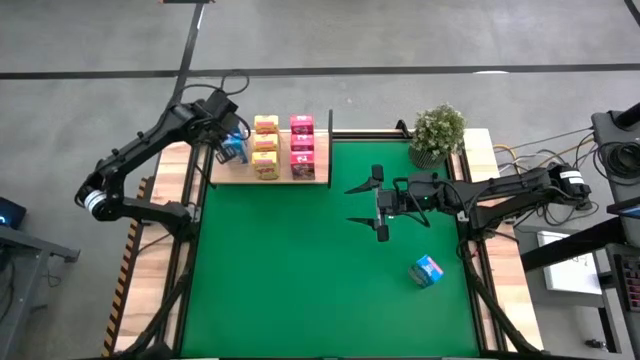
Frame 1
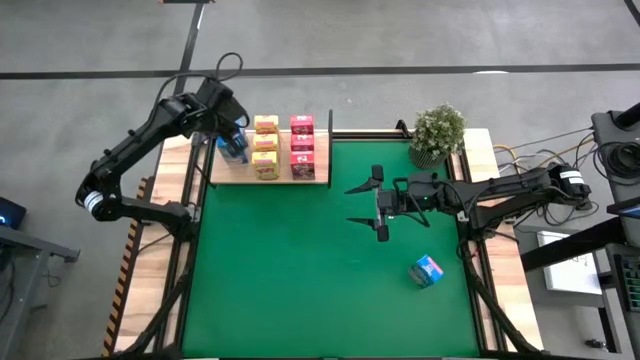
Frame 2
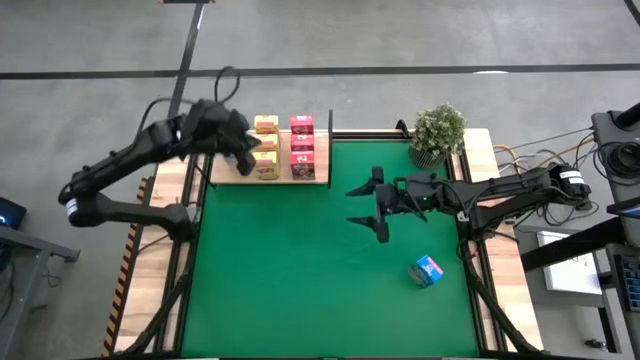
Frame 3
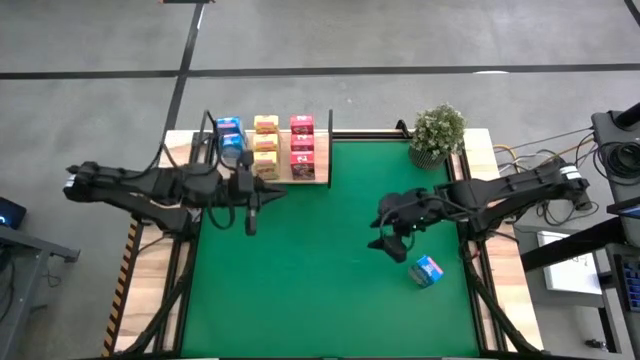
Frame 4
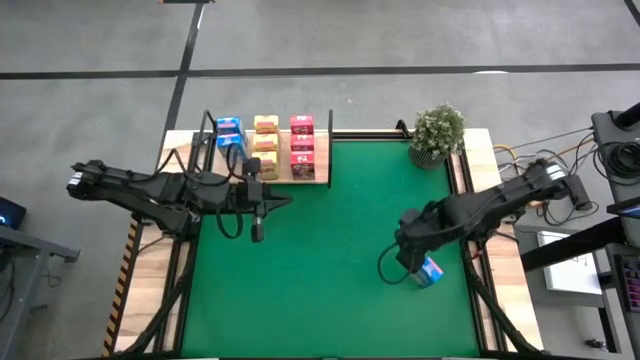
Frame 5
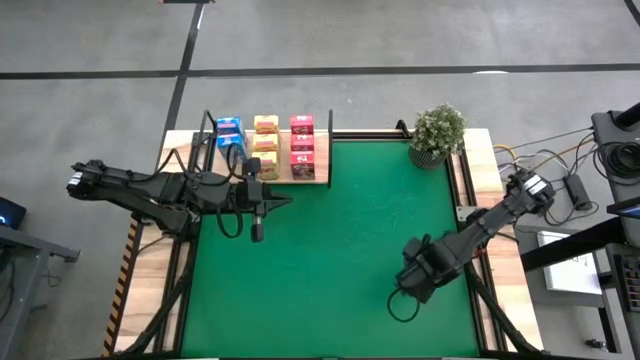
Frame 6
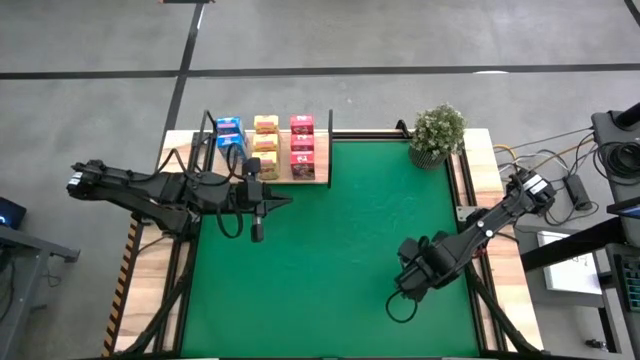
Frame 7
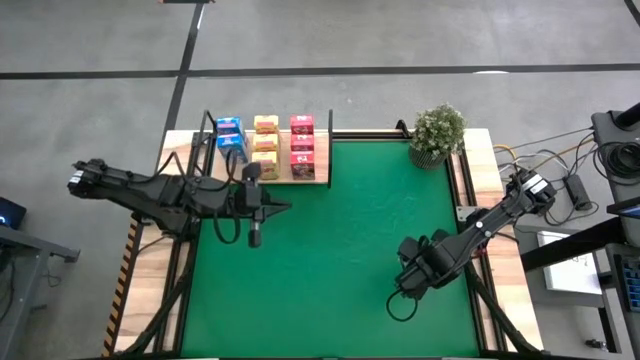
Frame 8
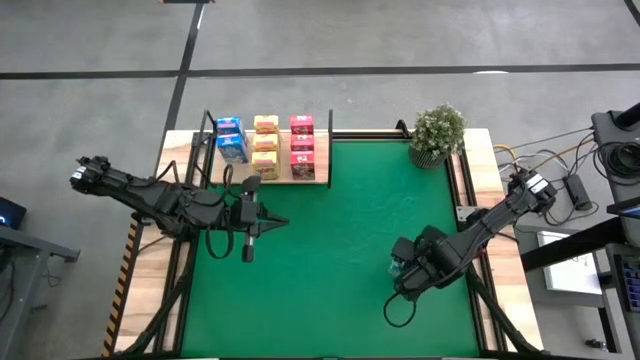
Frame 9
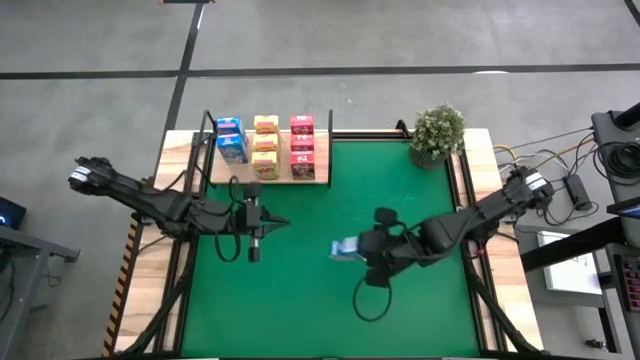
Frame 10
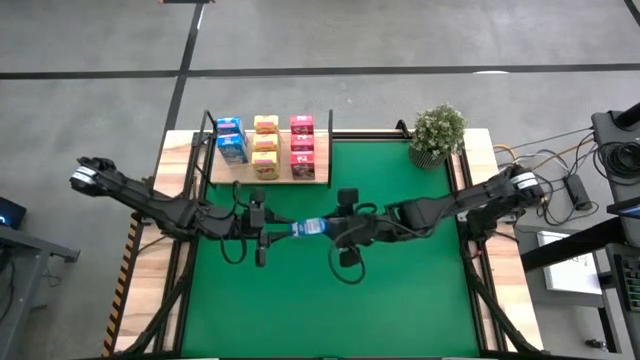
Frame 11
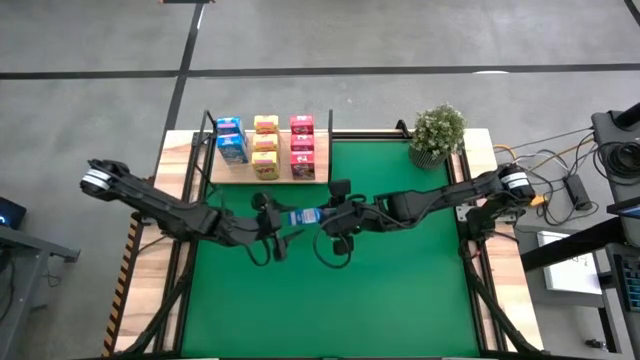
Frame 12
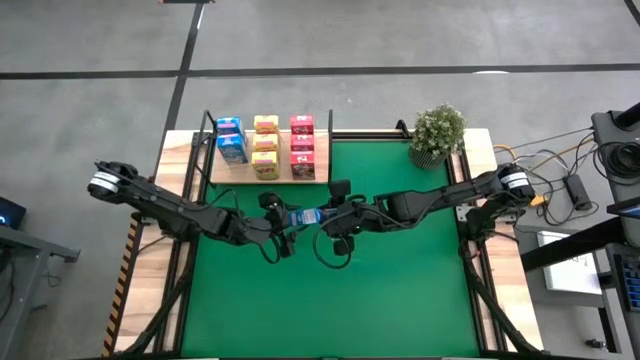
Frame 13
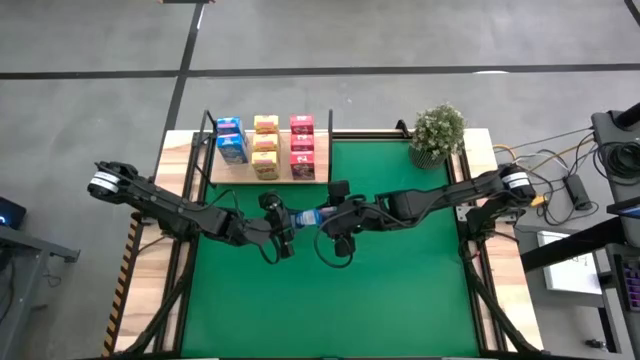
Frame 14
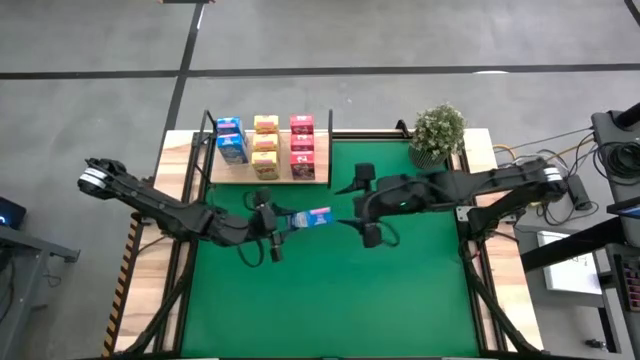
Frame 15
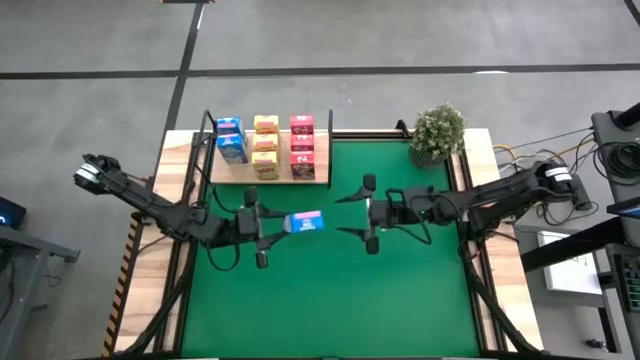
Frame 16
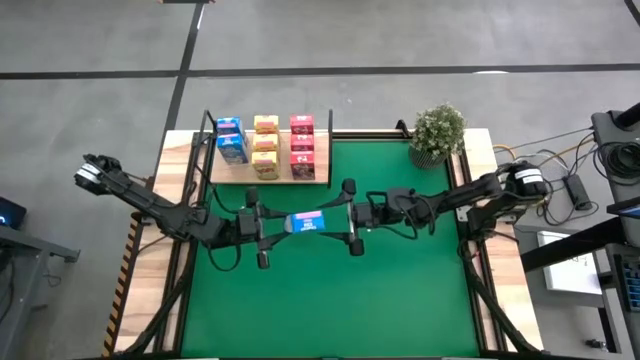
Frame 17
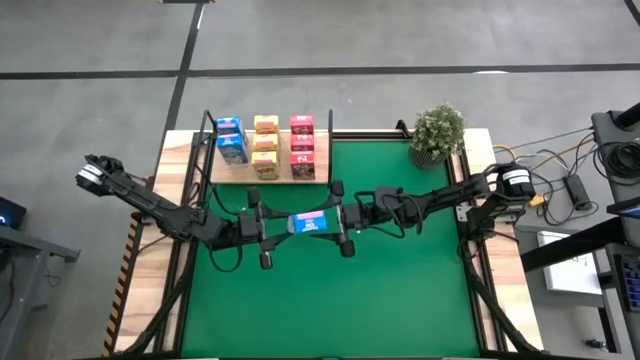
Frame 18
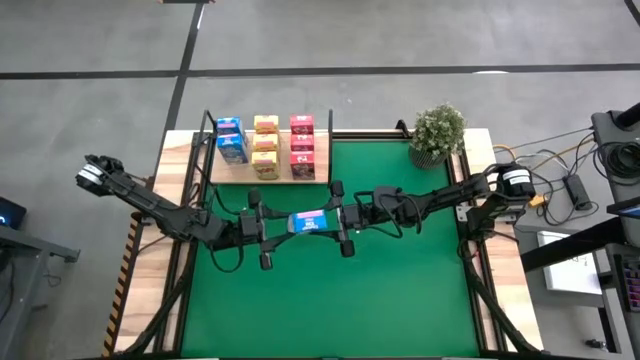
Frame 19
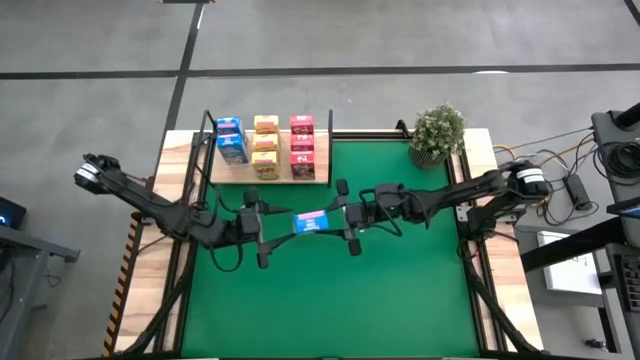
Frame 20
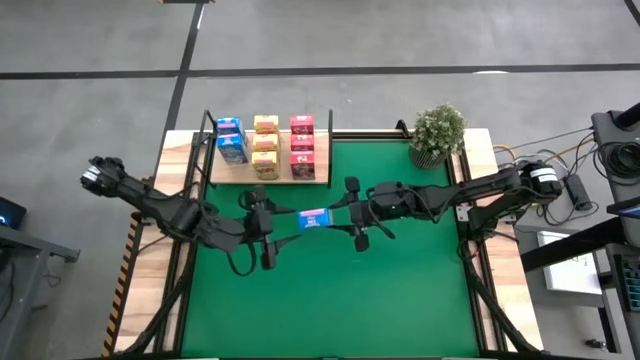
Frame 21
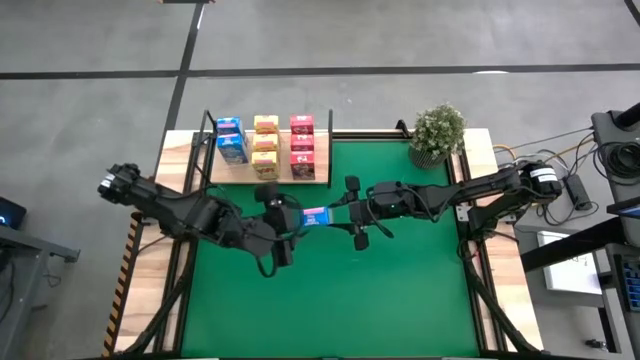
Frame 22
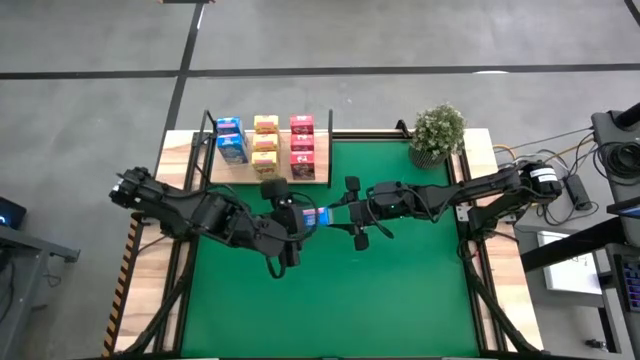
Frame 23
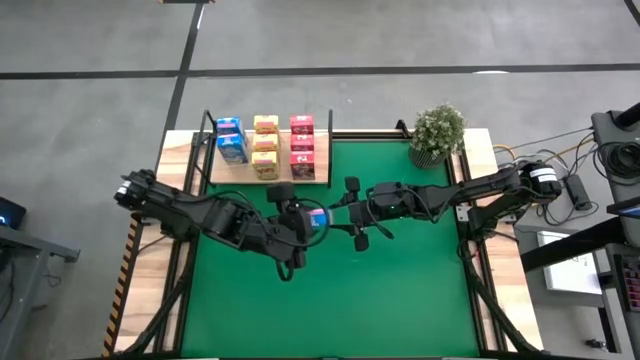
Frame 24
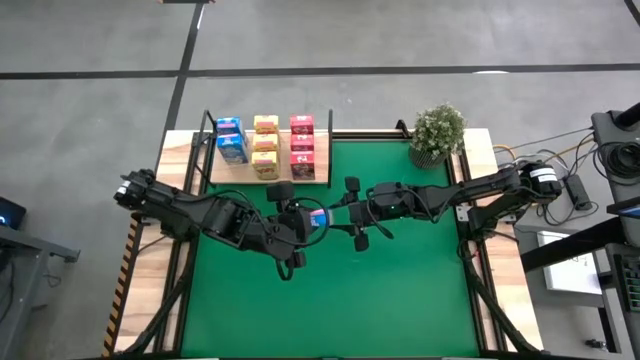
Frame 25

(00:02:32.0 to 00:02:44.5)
Task: Stack cereal on shelf
Put the blue cereal box aligned with the blue cereal box on the shelf

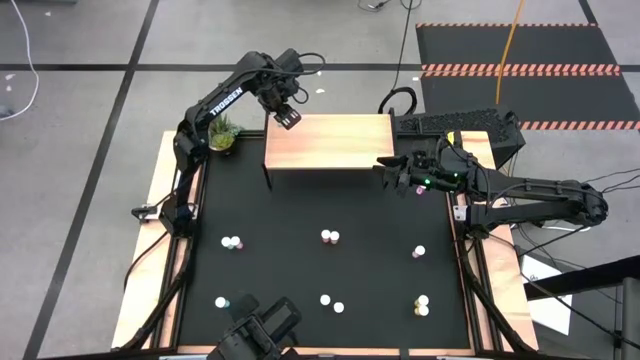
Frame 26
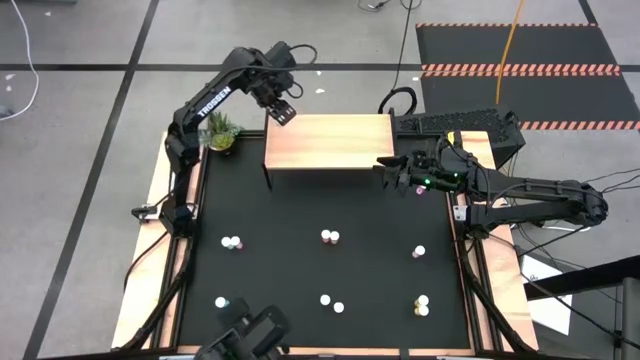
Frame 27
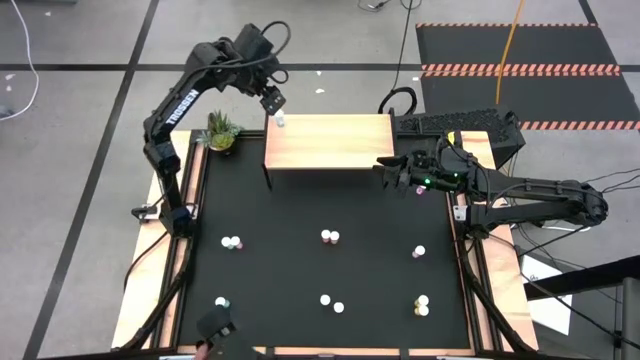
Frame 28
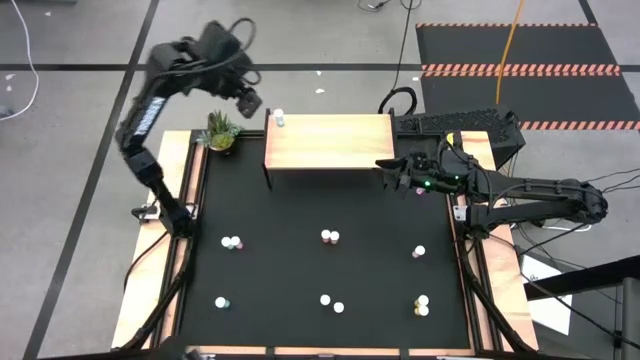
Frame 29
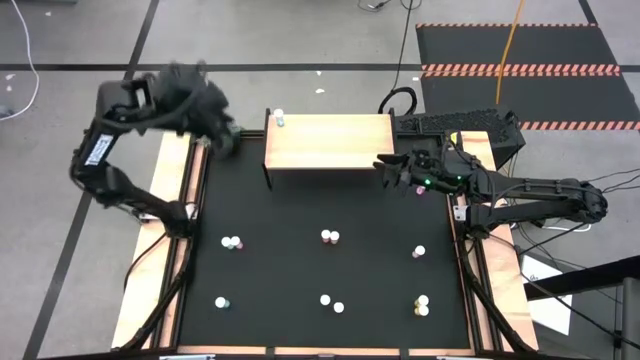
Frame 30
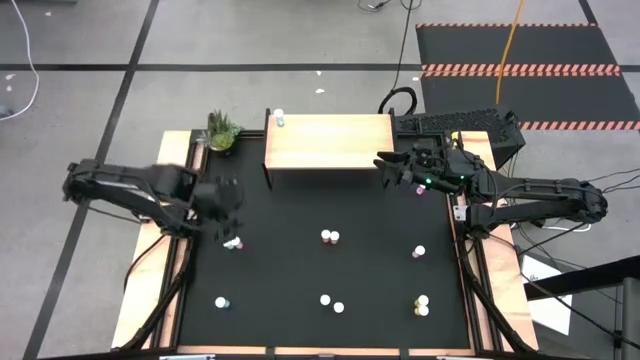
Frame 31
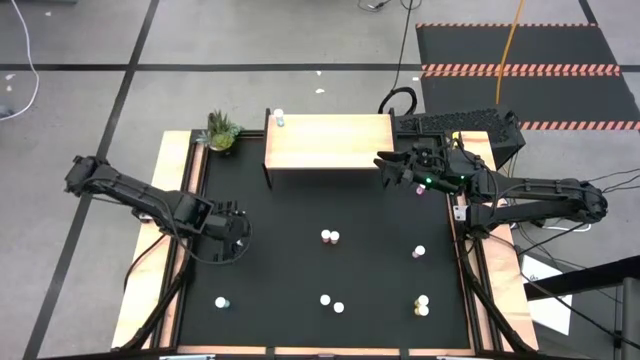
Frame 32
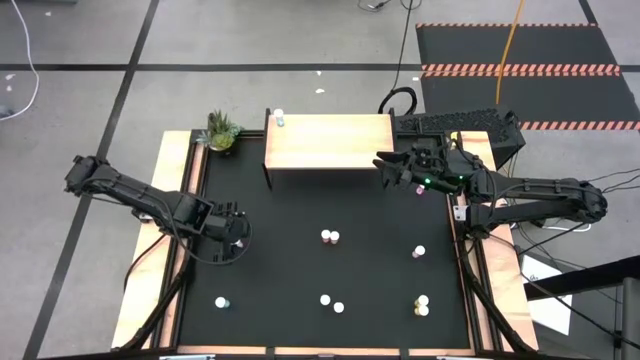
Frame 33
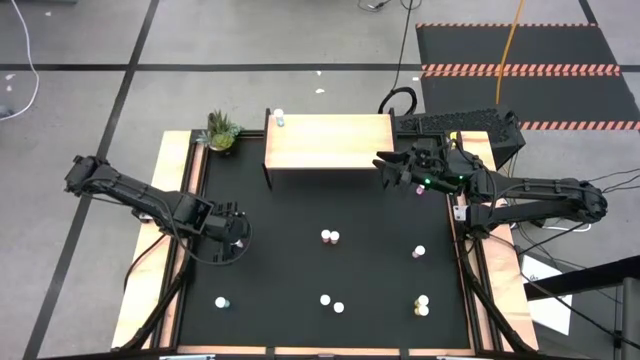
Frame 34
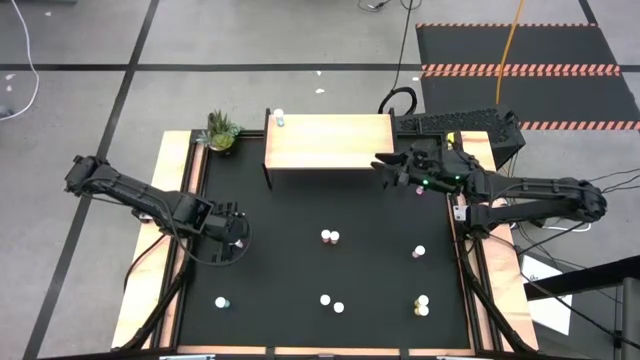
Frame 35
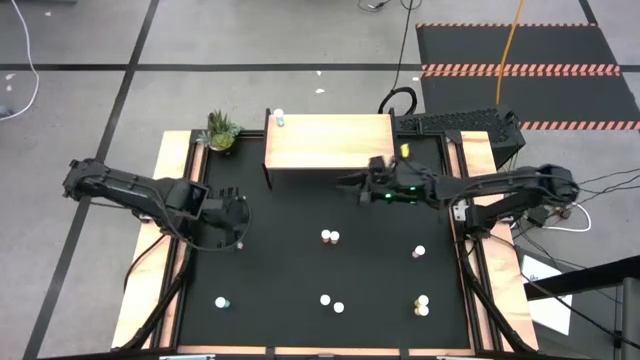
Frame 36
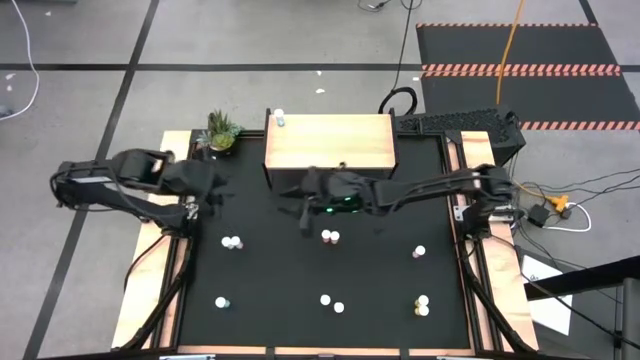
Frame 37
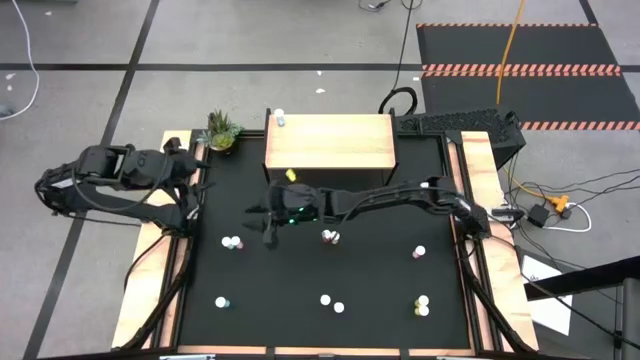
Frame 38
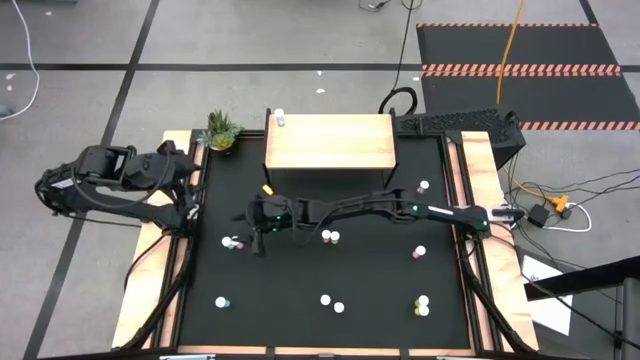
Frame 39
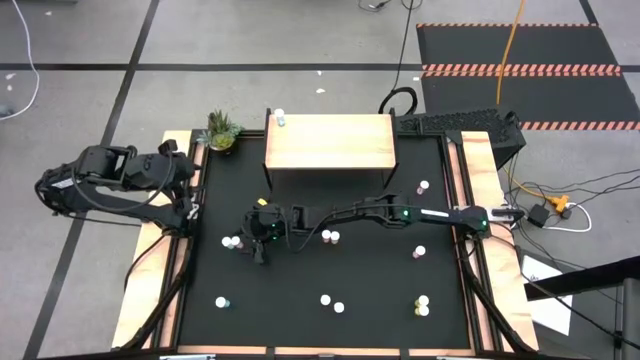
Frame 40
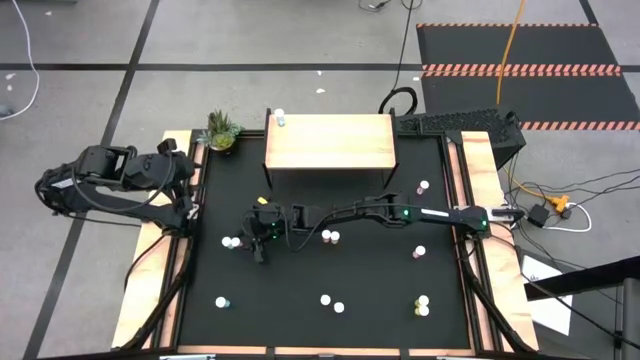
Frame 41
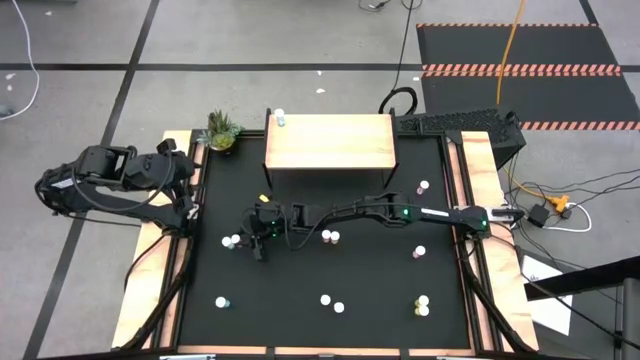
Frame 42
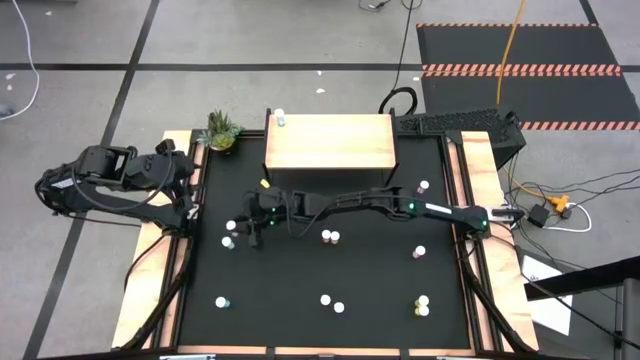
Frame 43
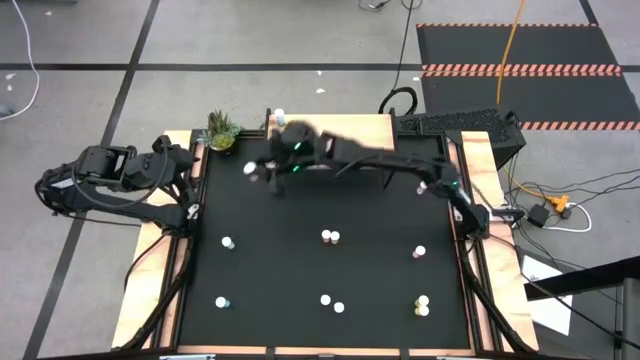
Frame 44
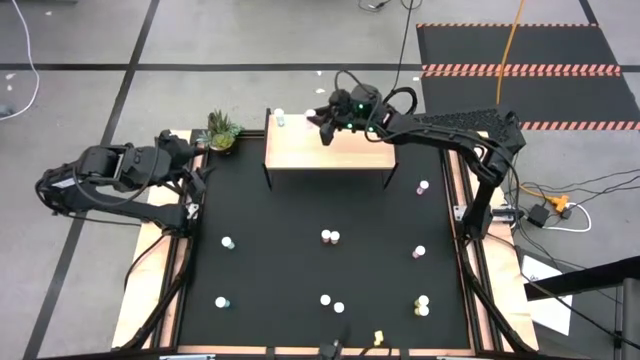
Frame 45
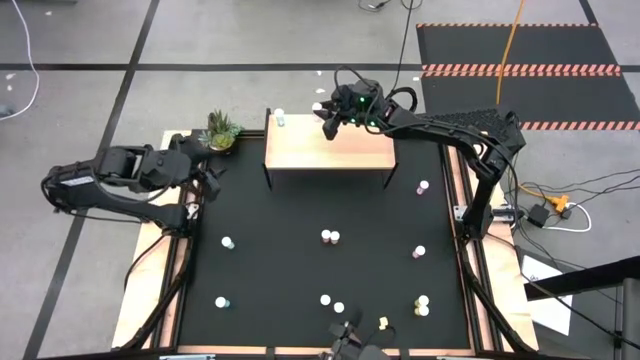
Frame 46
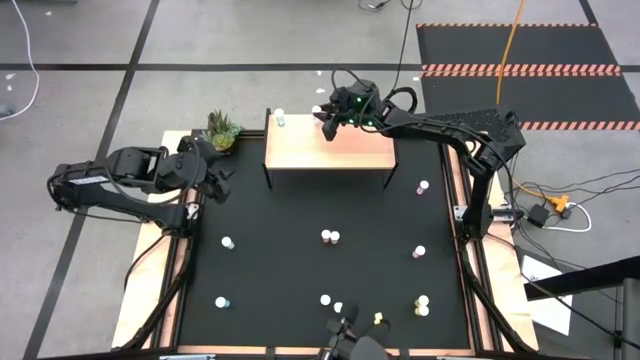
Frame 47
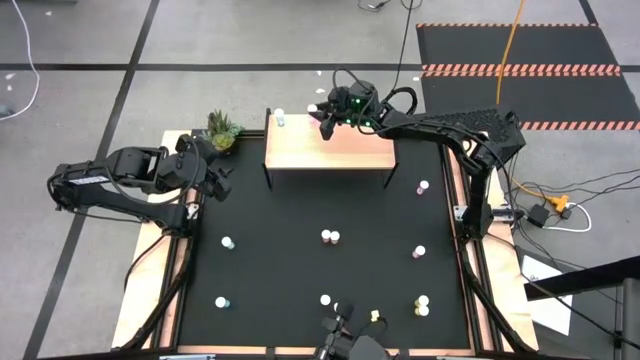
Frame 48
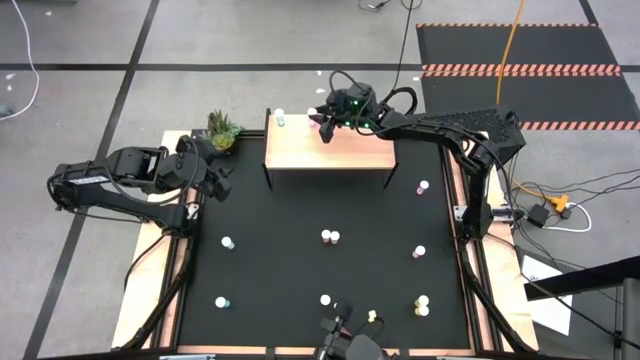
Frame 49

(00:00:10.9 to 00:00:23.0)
Task: Pick and place medicine bottles onto shelf by color
Put the bottom left violet pill bottle on the shelf
